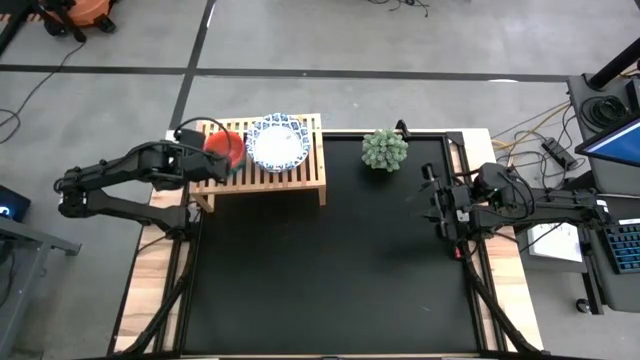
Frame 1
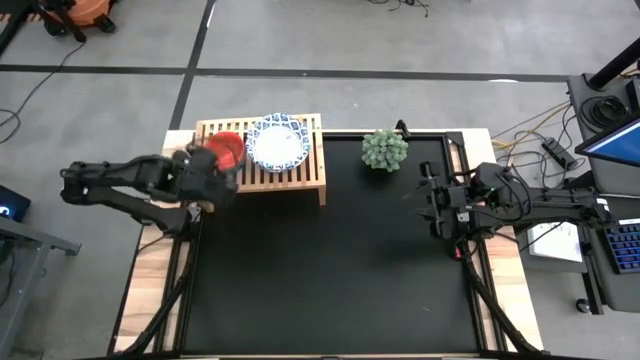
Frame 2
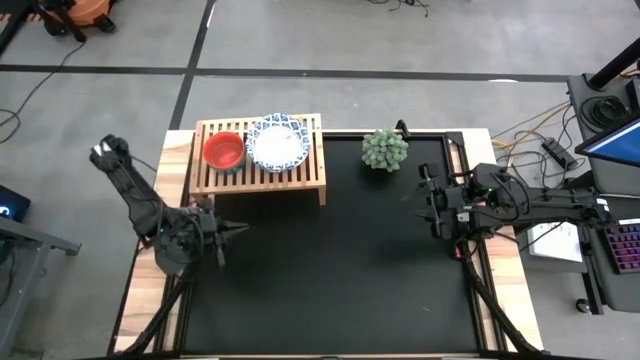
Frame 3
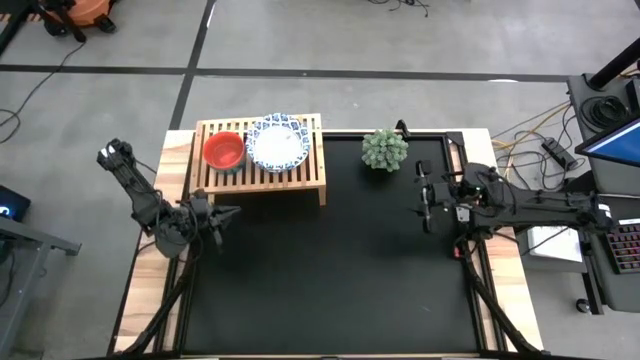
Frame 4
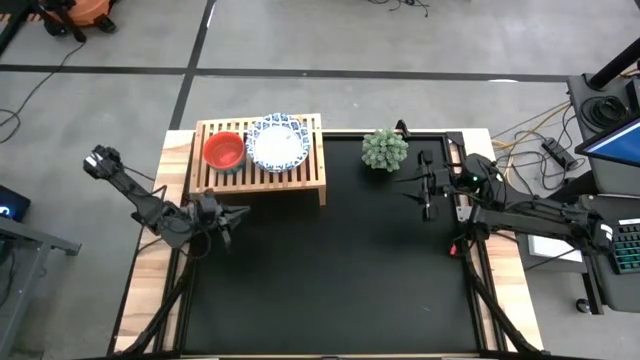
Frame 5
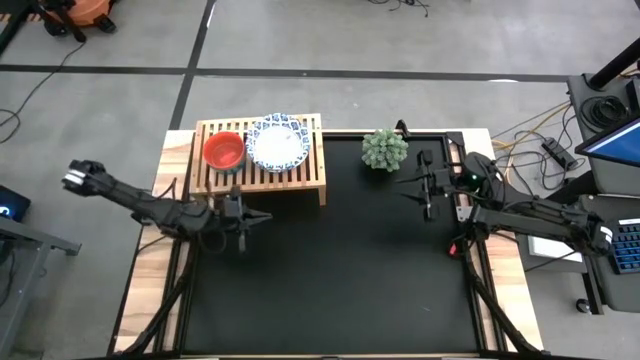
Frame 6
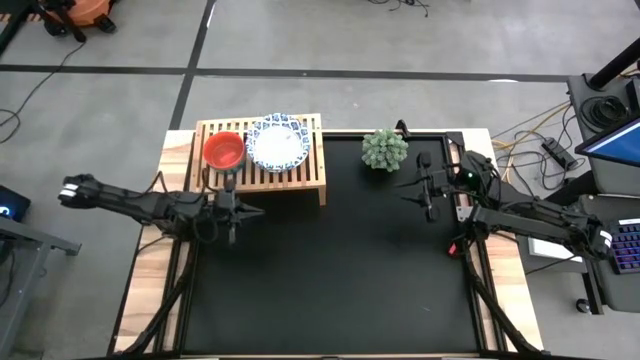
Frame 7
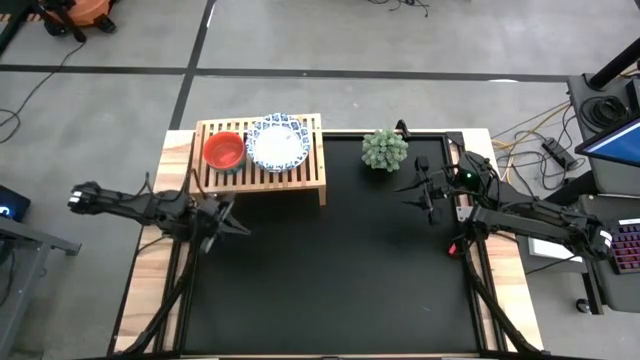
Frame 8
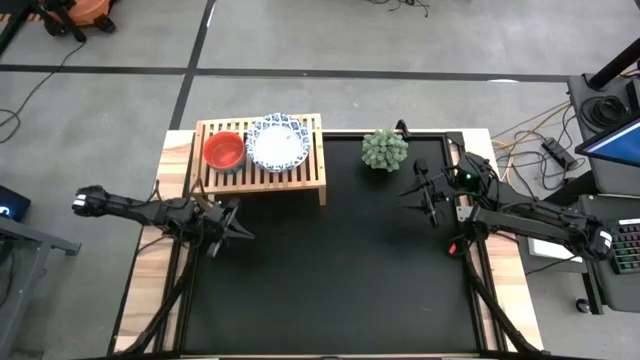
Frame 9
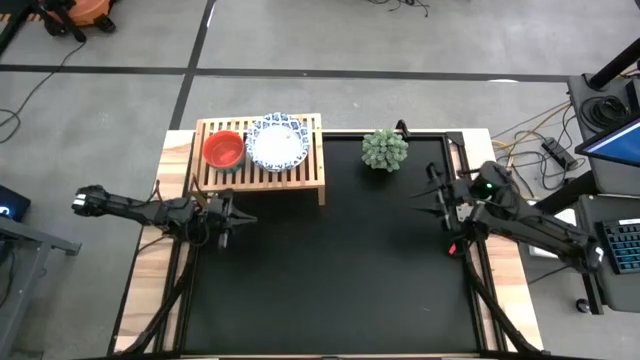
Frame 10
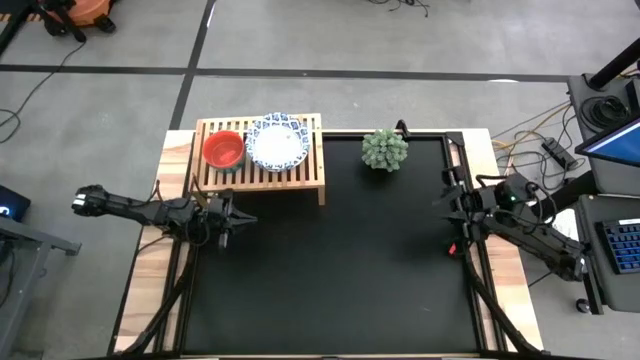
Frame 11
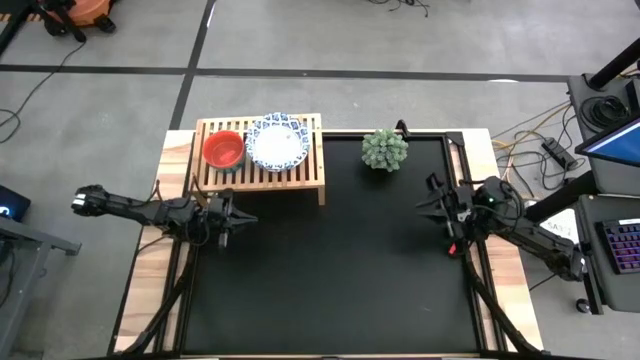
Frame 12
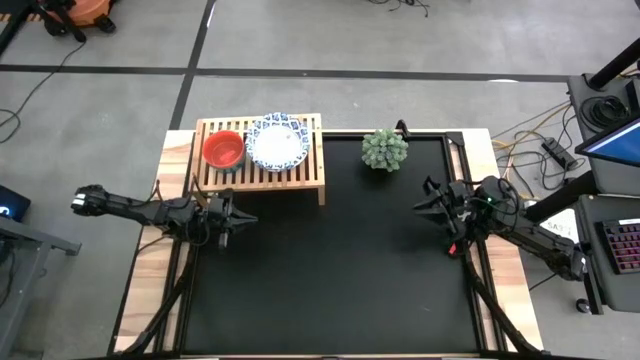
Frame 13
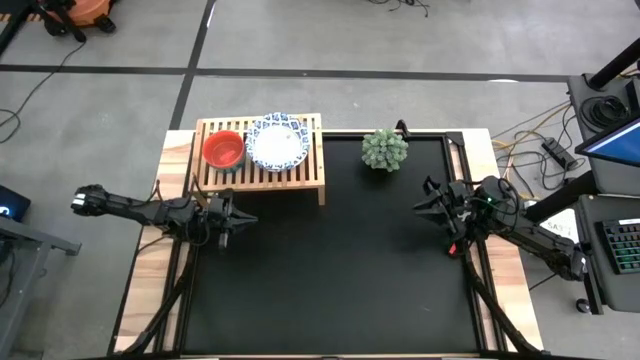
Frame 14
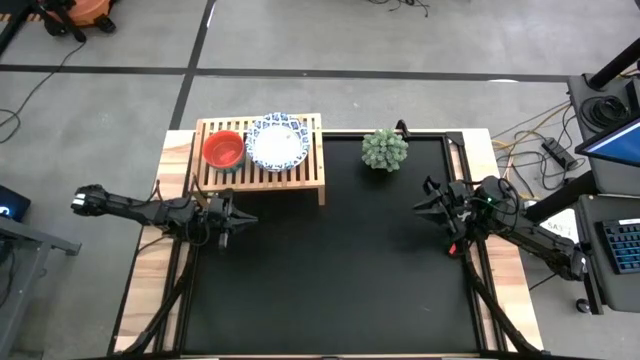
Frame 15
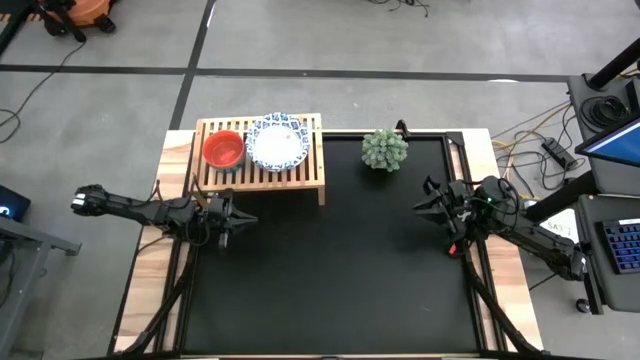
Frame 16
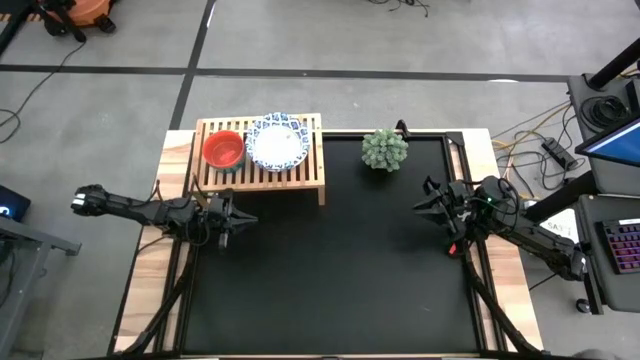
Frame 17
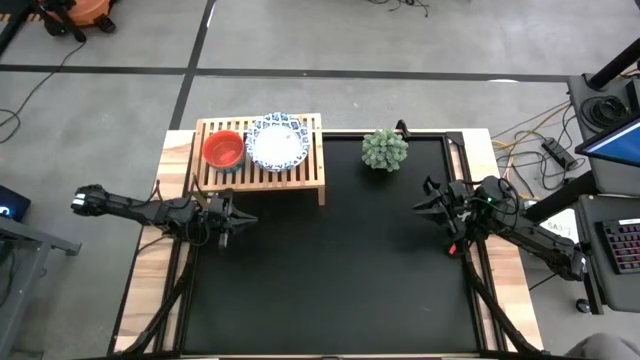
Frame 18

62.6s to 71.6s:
Task: Place and stack bowls onto a shelf
Return to Home Position

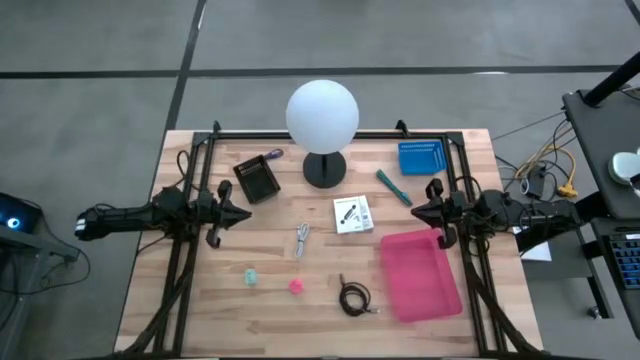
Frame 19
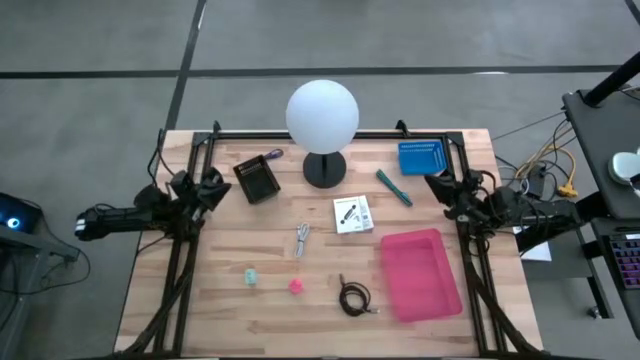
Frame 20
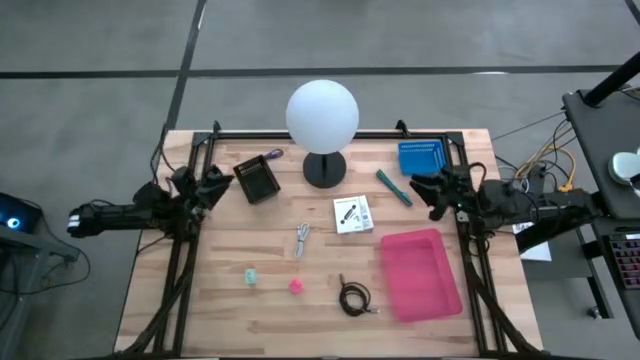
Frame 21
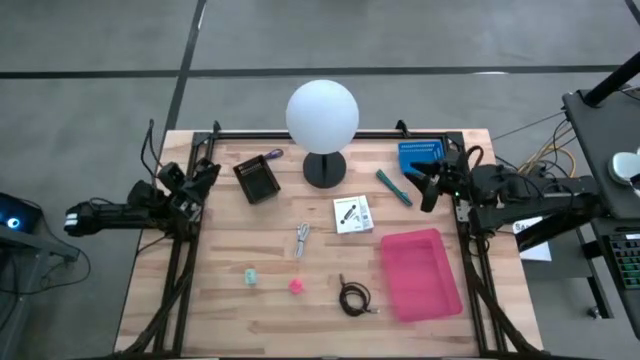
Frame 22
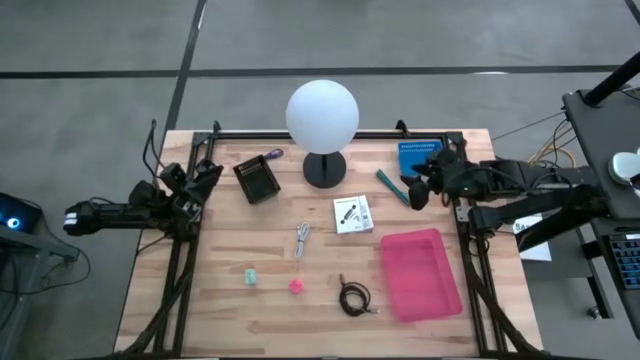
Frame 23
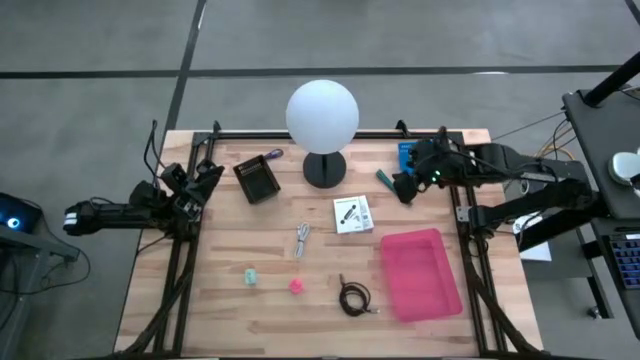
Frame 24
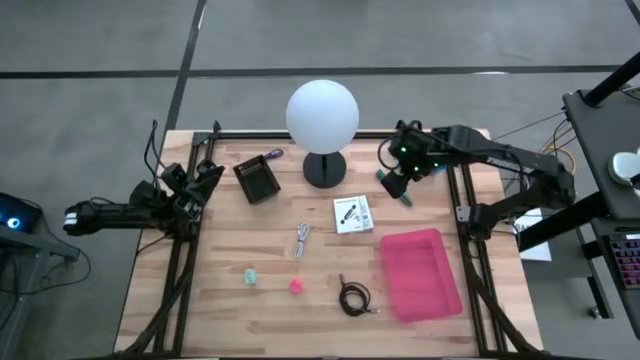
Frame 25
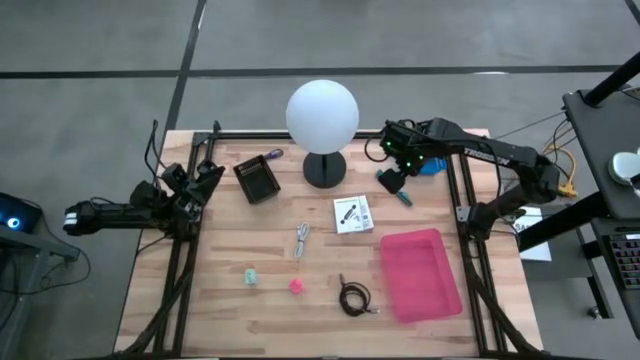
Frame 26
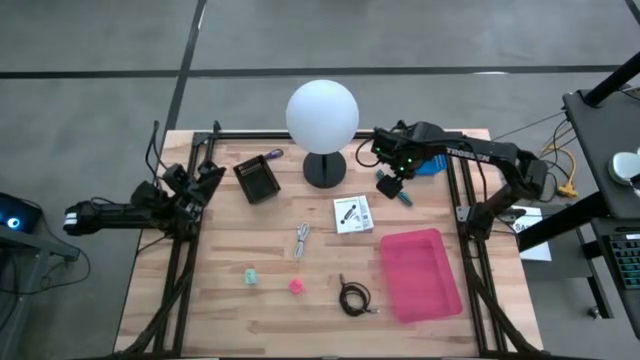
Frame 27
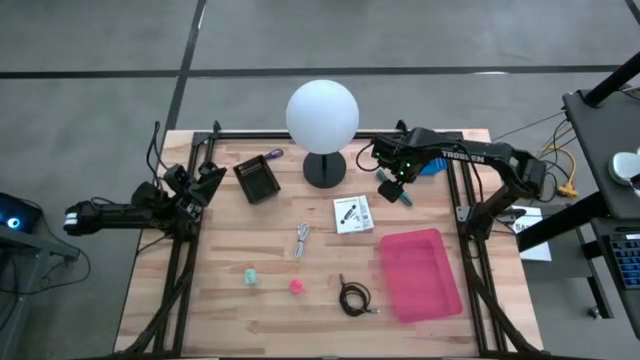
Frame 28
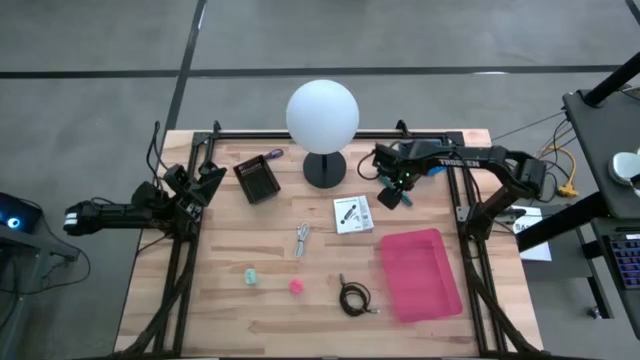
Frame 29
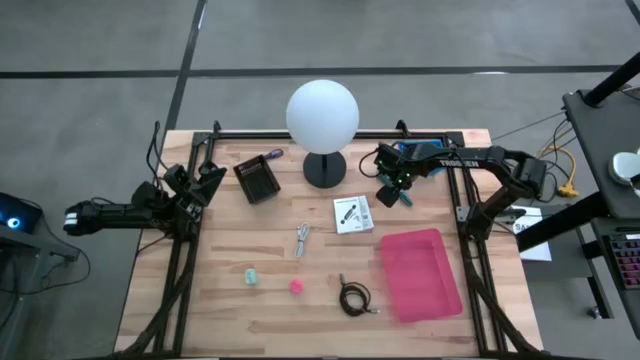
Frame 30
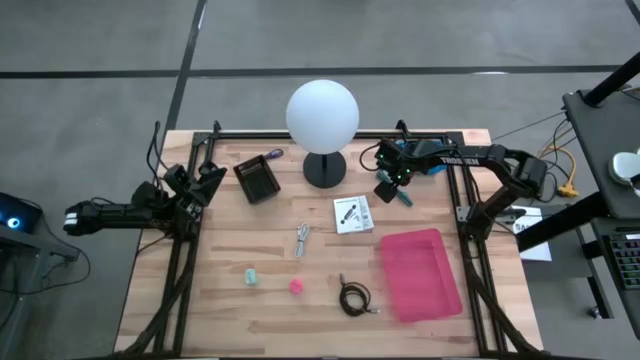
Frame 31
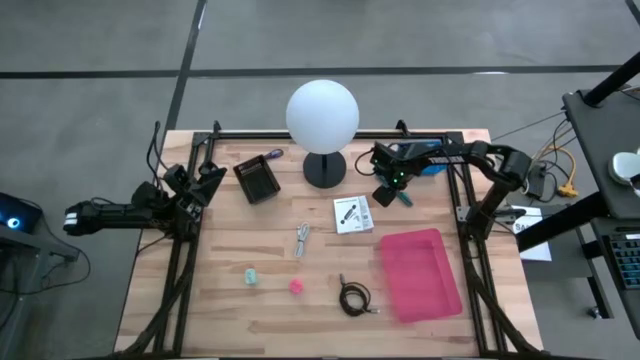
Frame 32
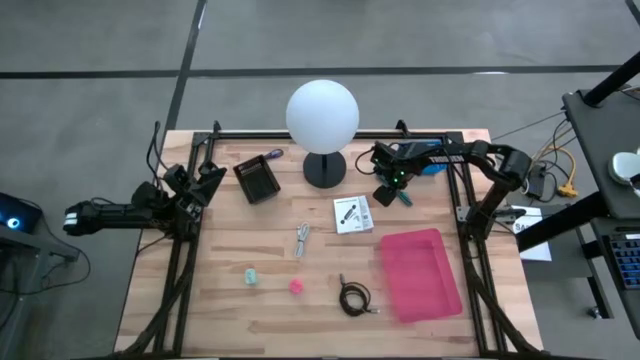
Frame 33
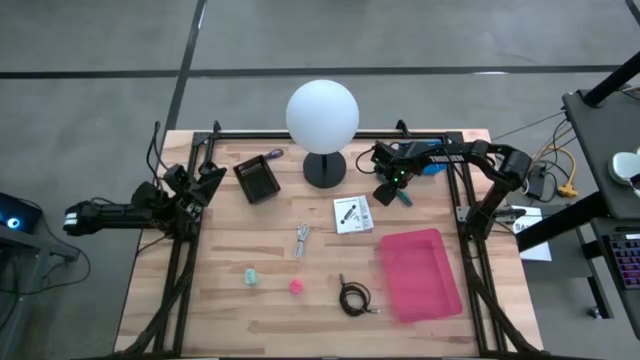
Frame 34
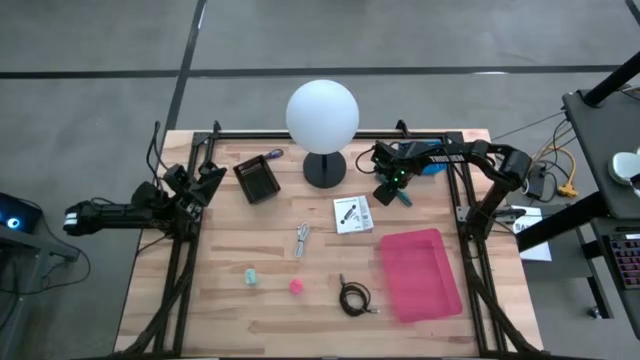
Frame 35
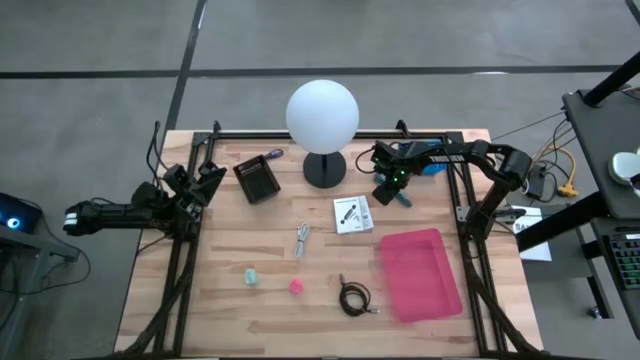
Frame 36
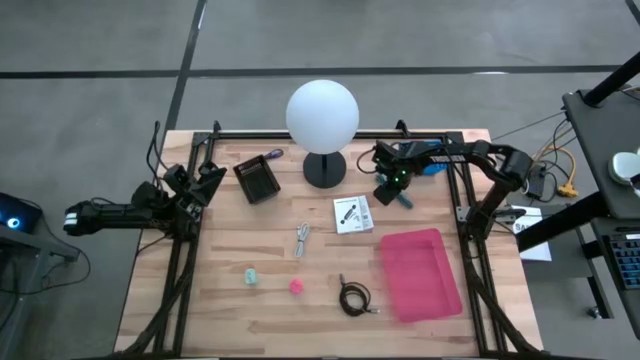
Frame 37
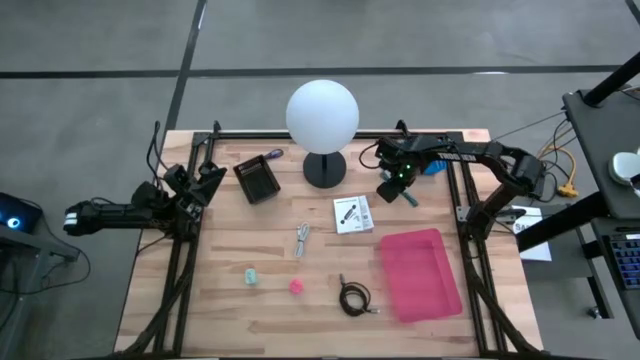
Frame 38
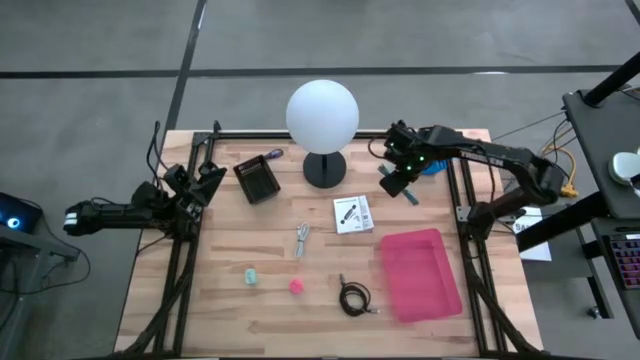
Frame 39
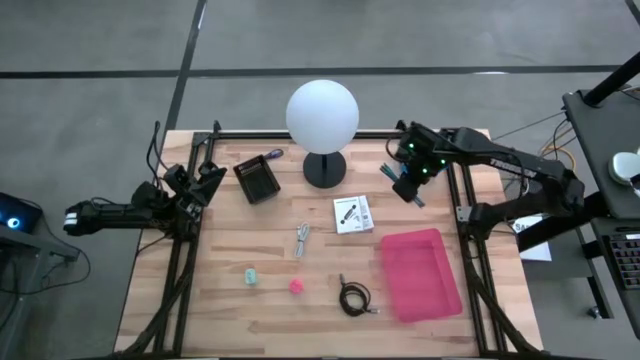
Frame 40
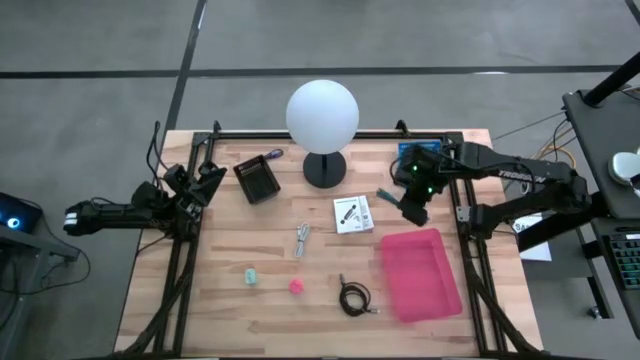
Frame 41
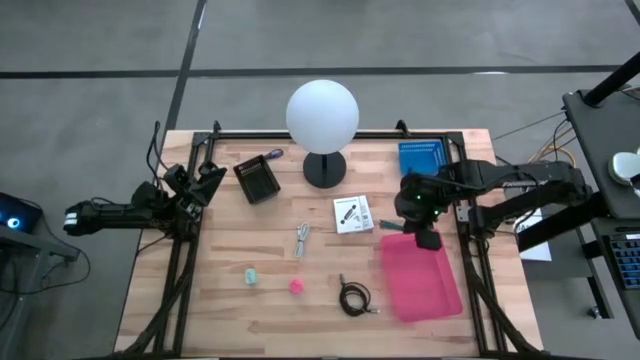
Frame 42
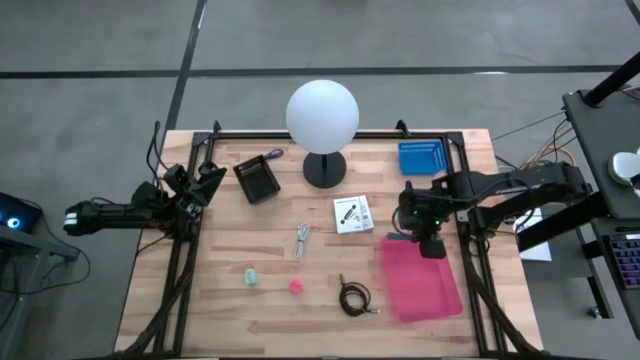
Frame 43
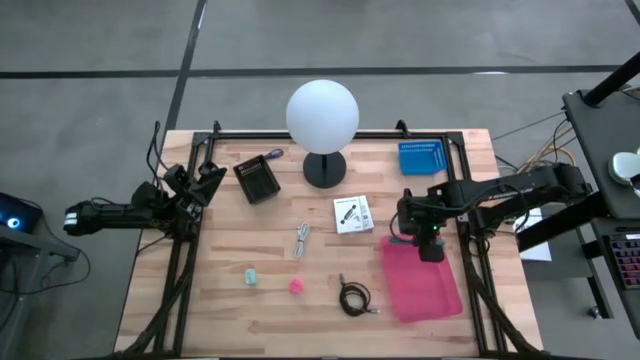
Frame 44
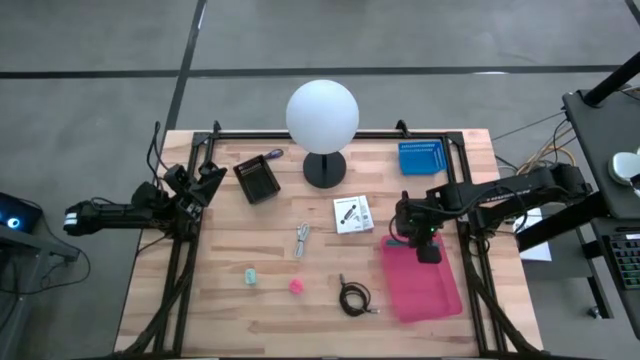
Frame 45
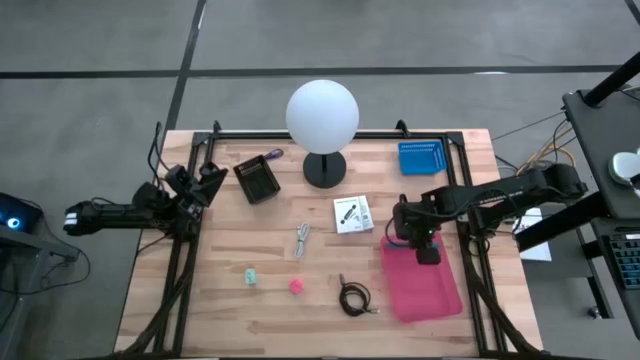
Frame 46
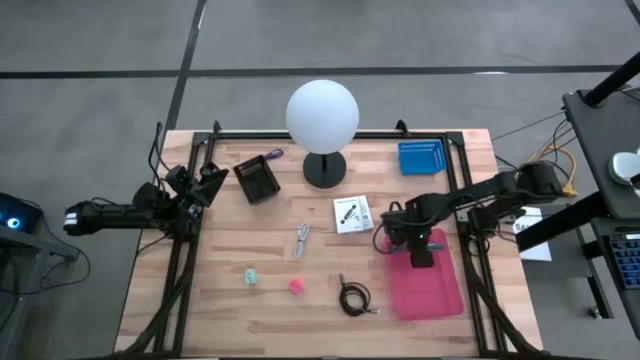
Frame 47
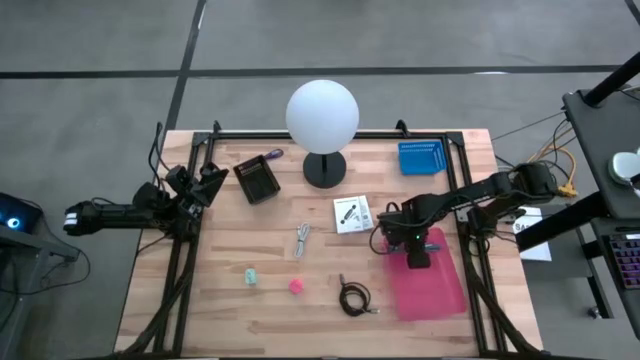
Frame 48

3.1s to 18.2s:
Task: Pick and place items into bin
Put the blue charger cable into the pink bin
